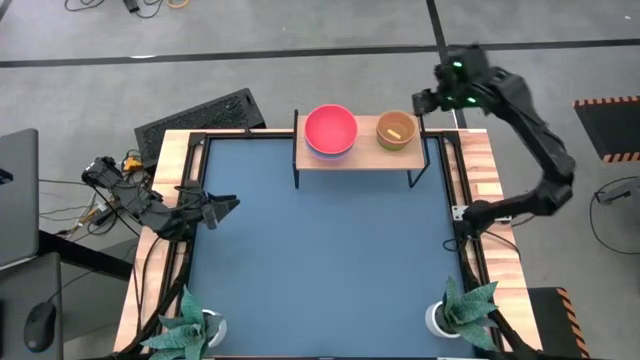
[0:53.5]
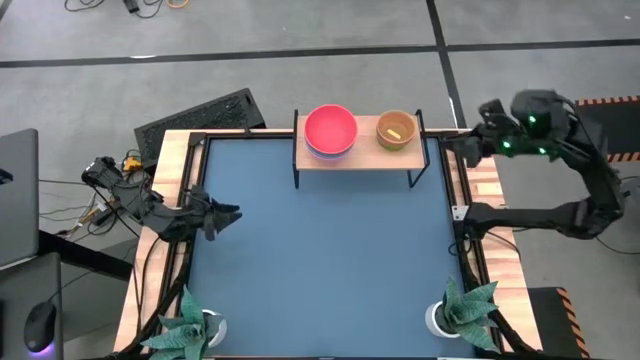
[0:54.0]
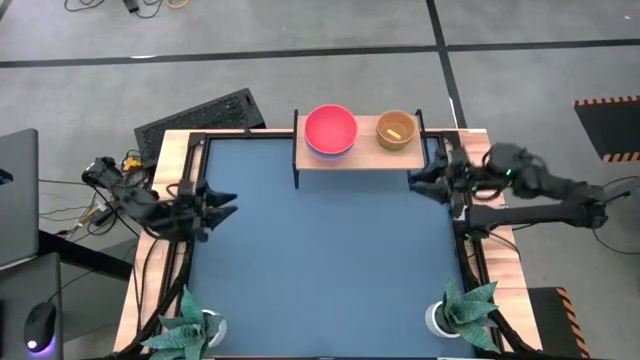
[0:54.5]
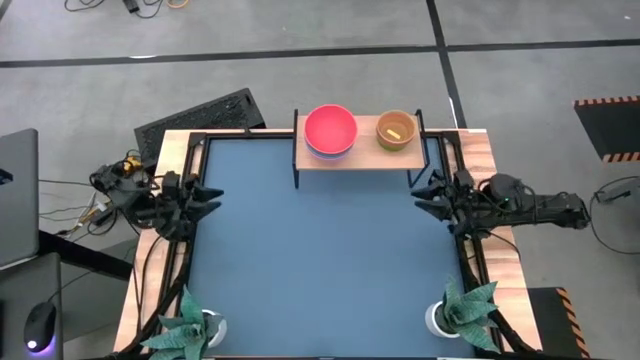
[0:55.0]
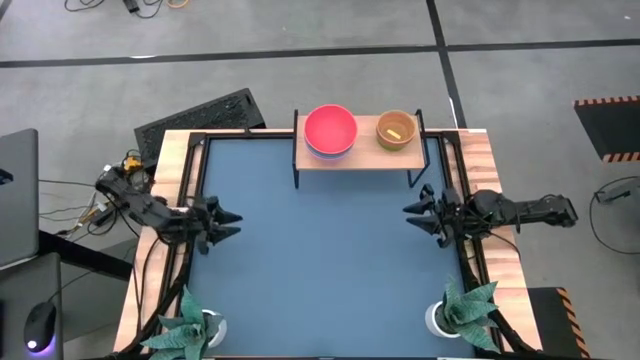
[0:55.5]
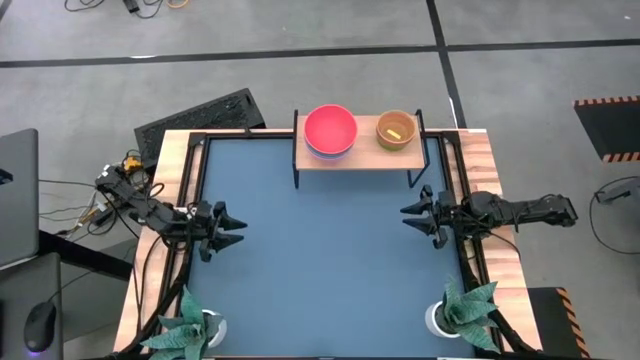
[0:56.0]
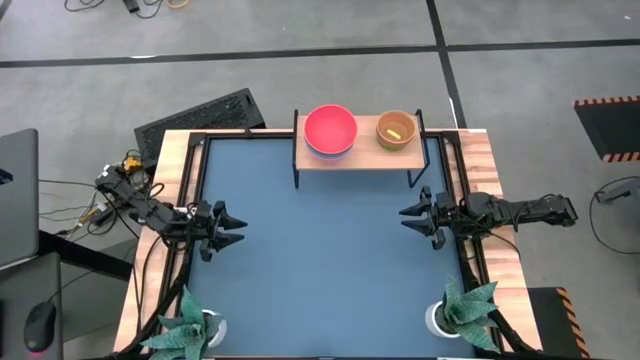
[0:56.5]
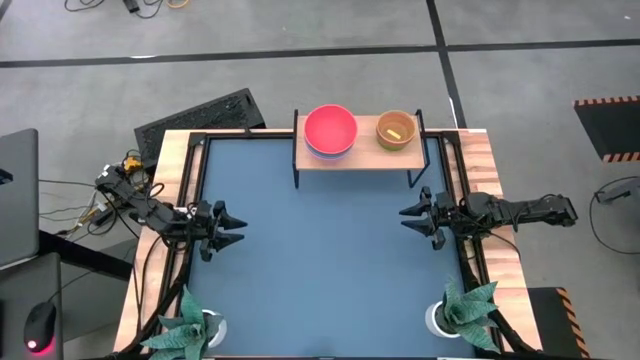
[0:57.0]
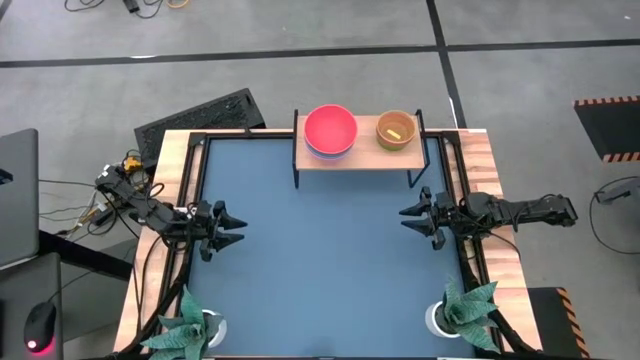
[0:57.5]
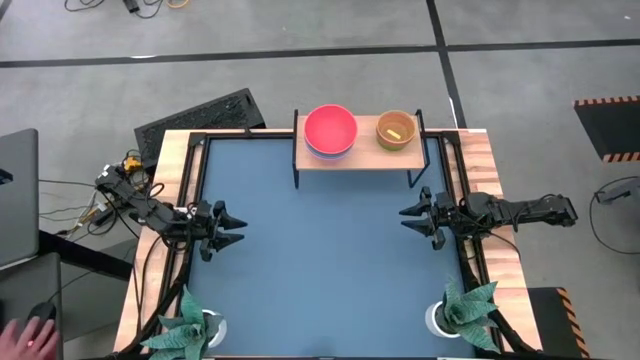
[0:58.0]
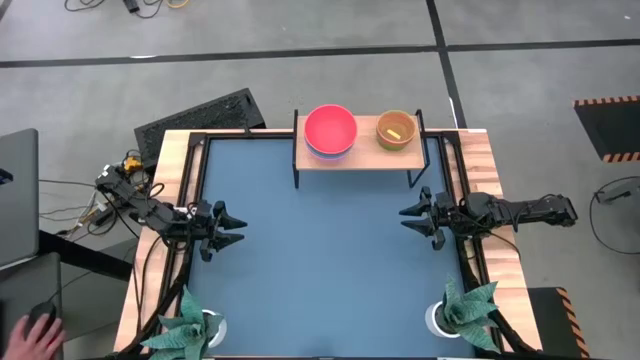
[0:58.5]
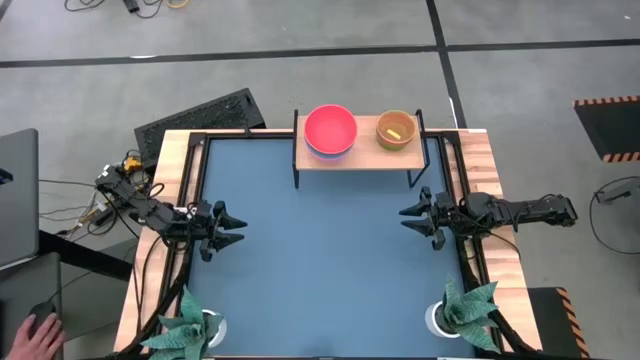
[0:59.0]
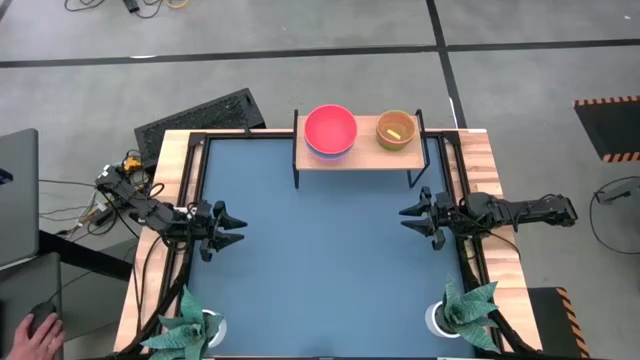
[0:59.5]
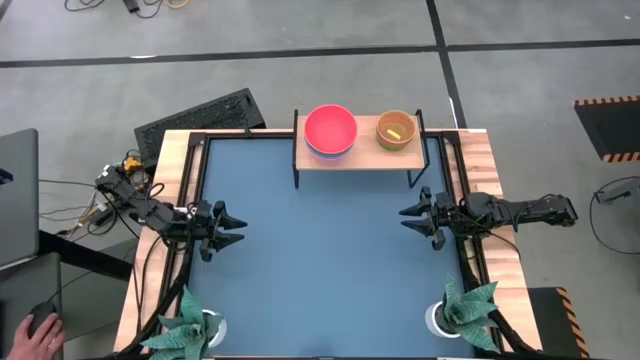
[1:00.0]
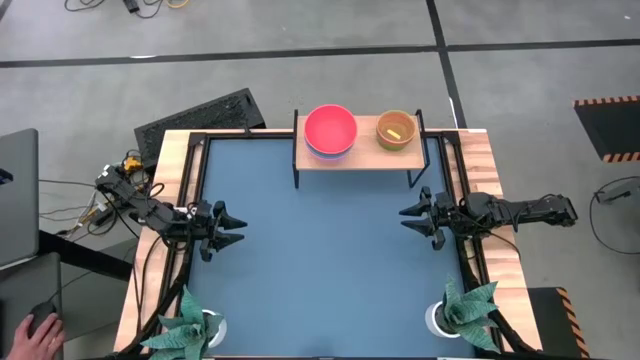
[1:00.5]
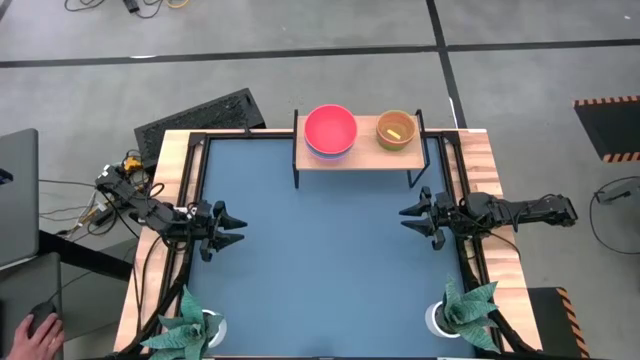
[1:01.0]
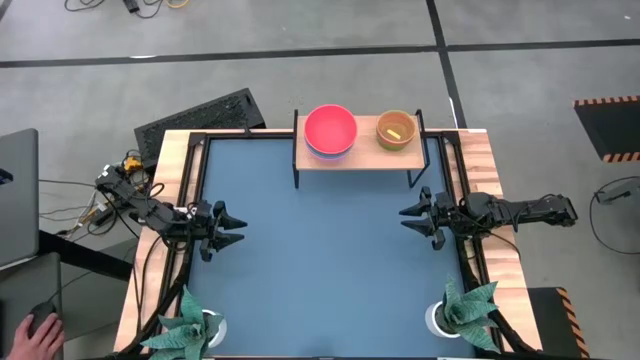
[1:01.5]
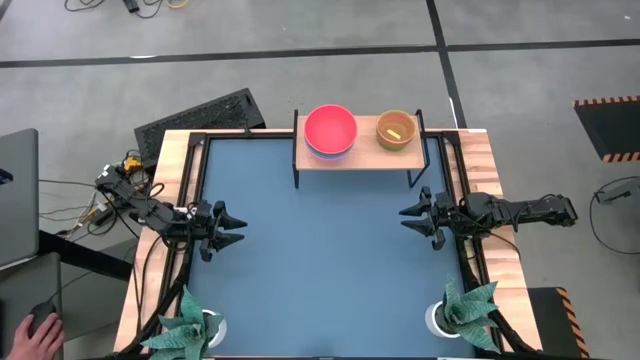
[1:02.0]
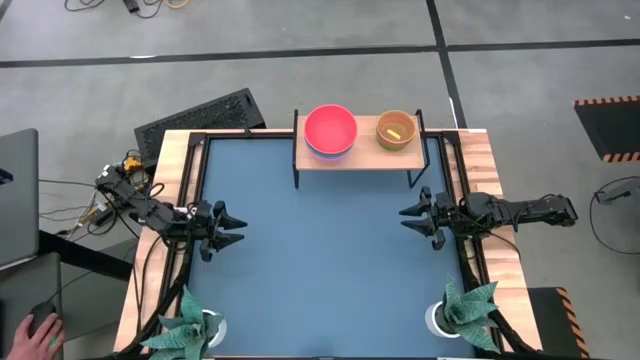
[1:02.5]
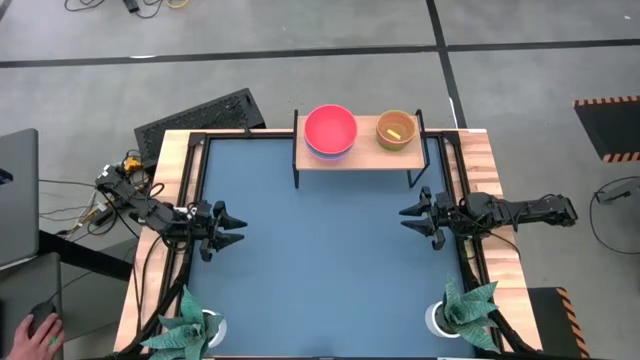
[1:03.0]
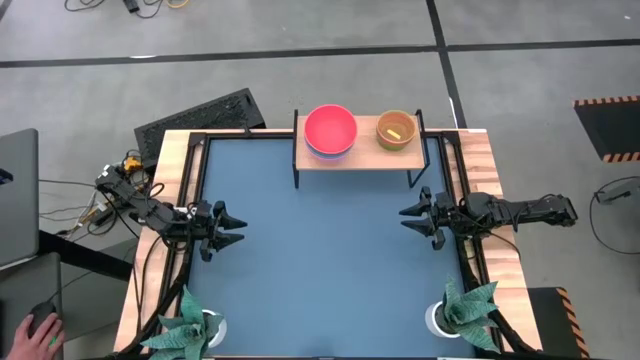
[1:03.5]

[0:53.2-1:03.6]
Task: Place and stack bowls onto a shelf
Return to Home Position

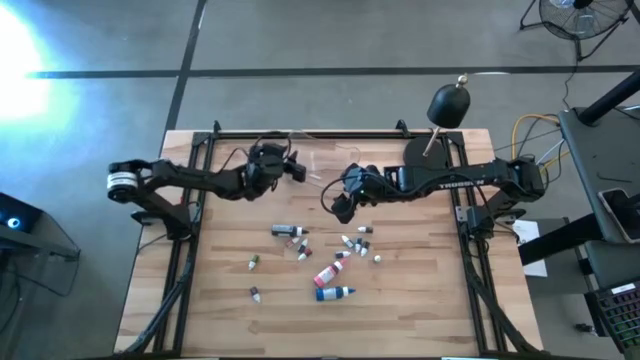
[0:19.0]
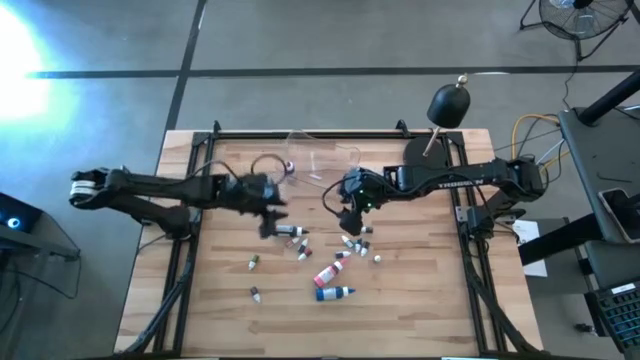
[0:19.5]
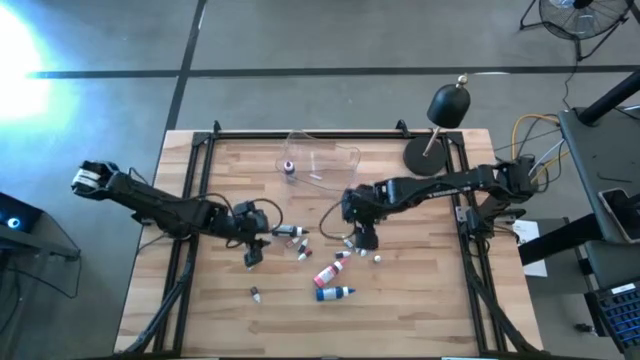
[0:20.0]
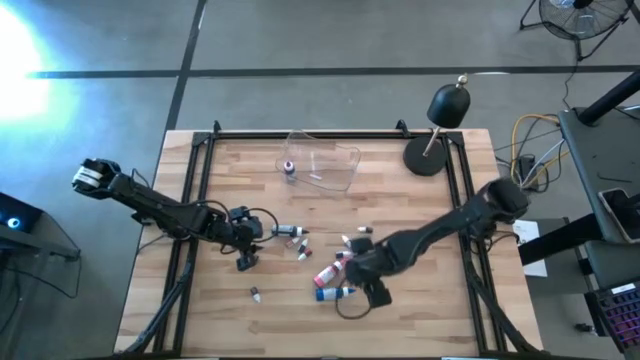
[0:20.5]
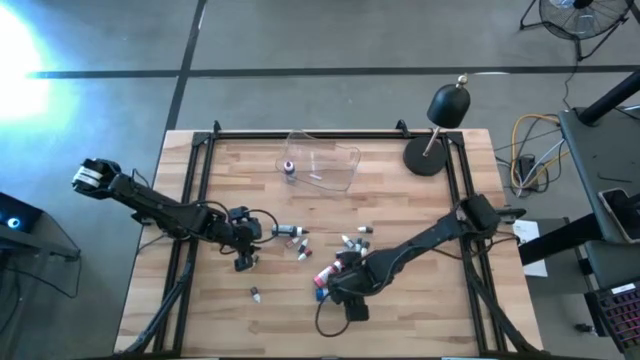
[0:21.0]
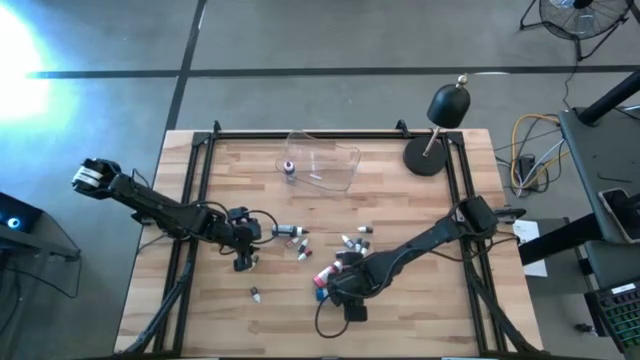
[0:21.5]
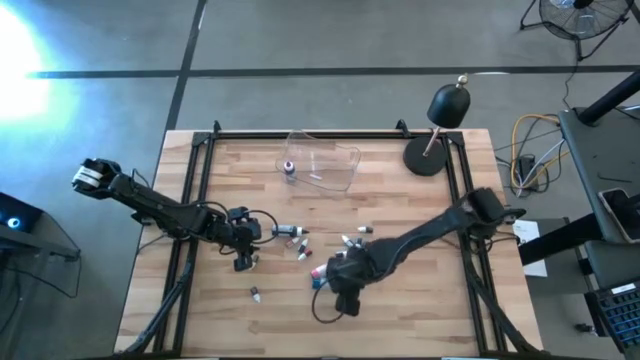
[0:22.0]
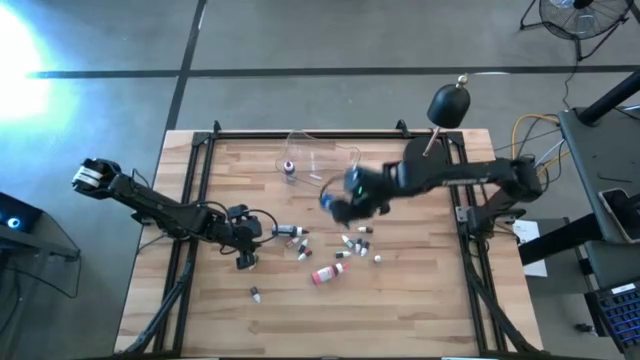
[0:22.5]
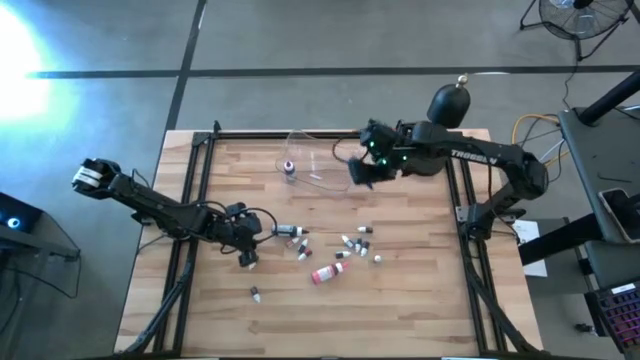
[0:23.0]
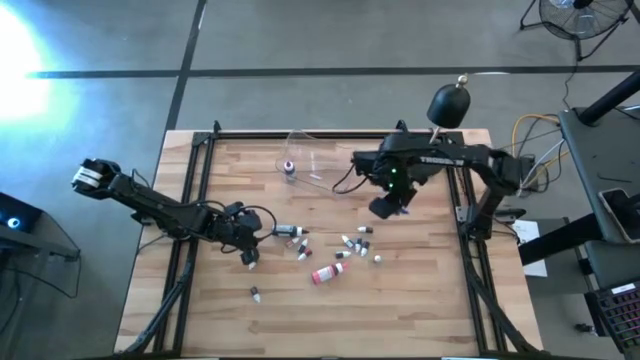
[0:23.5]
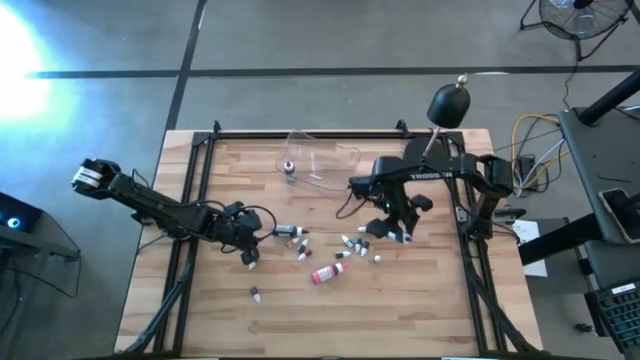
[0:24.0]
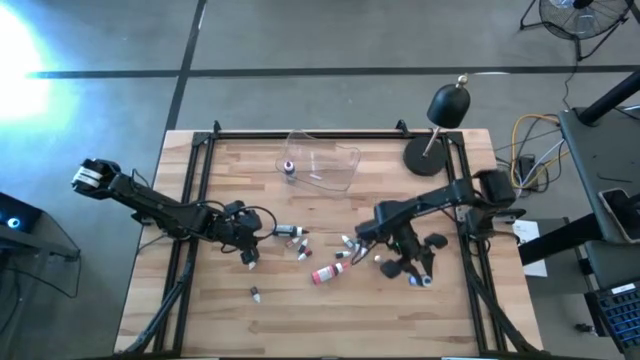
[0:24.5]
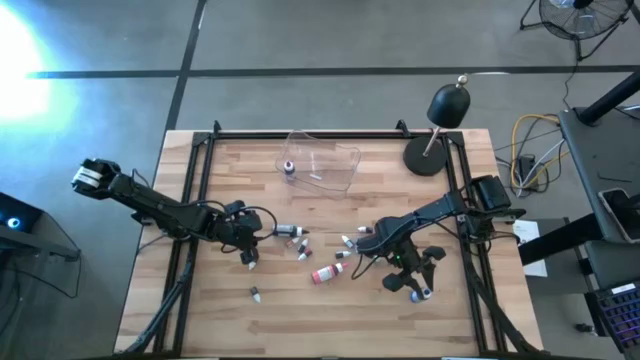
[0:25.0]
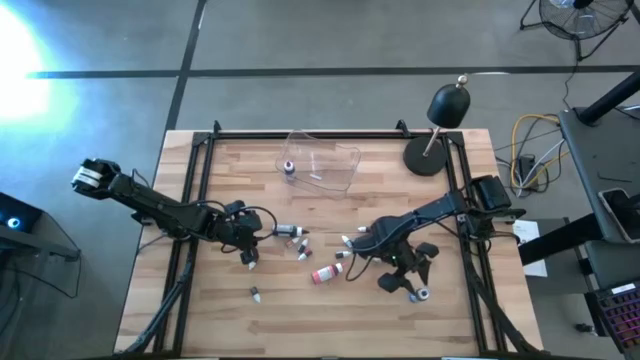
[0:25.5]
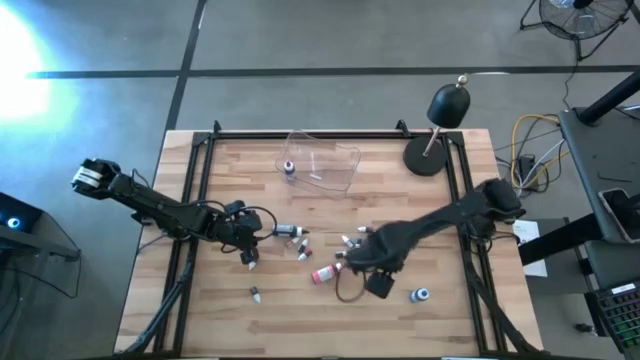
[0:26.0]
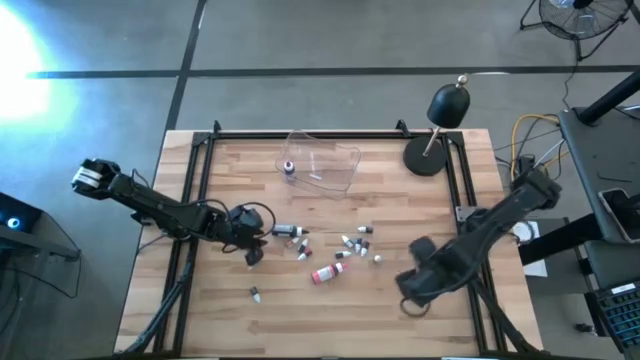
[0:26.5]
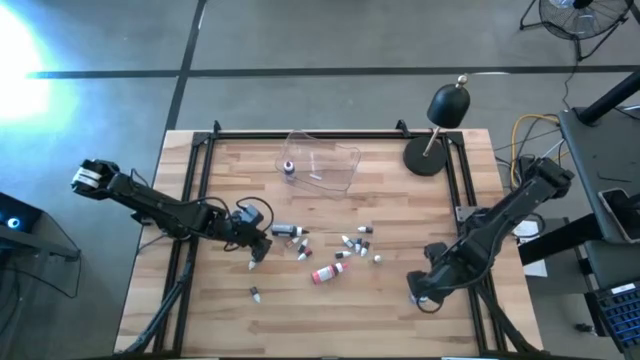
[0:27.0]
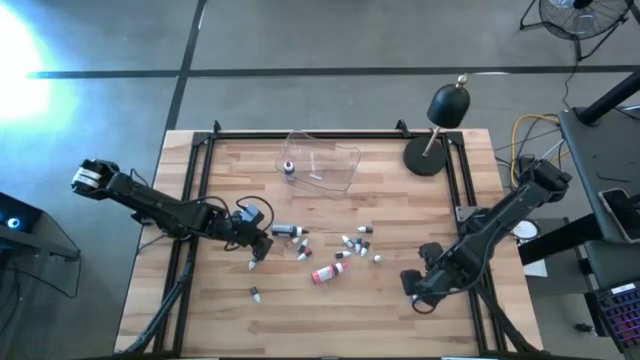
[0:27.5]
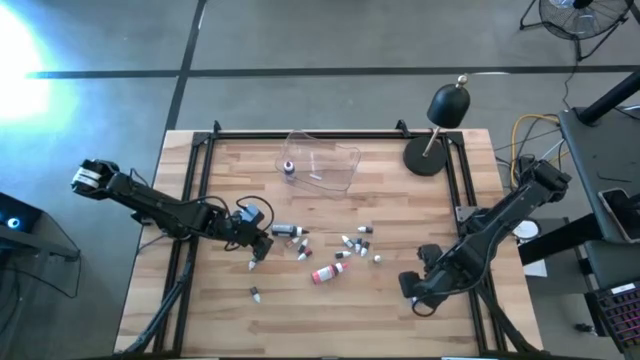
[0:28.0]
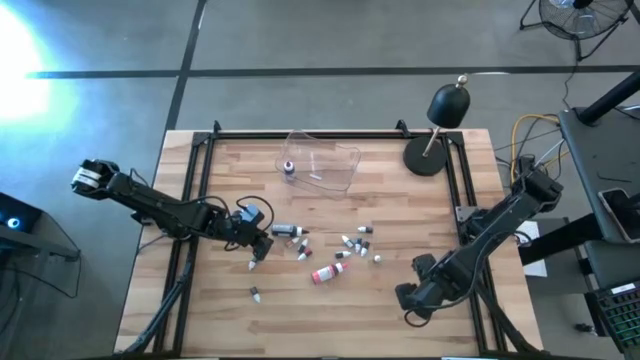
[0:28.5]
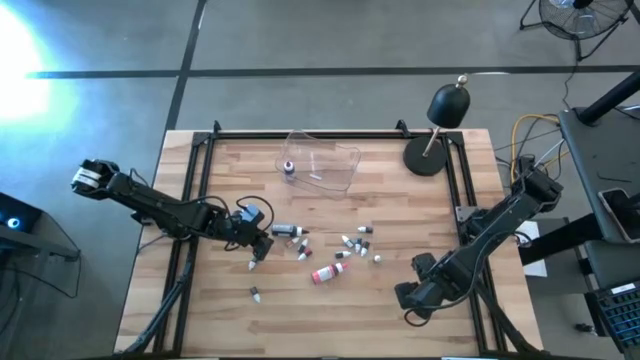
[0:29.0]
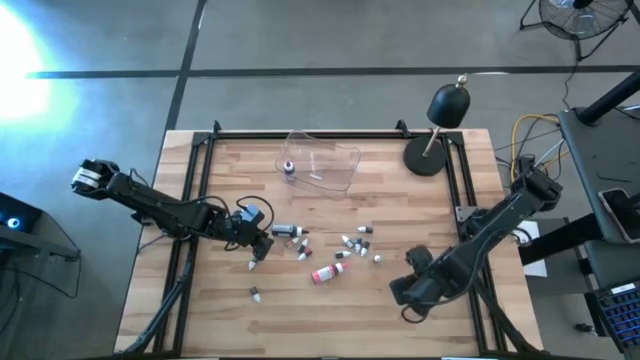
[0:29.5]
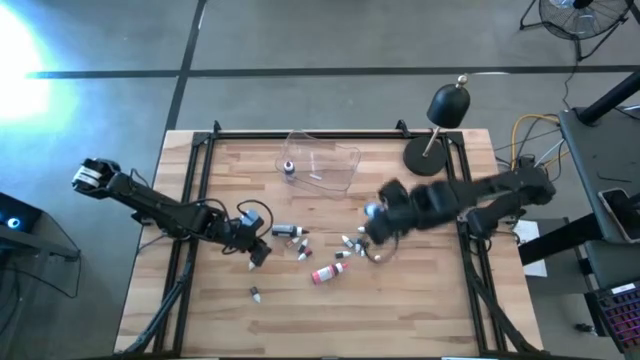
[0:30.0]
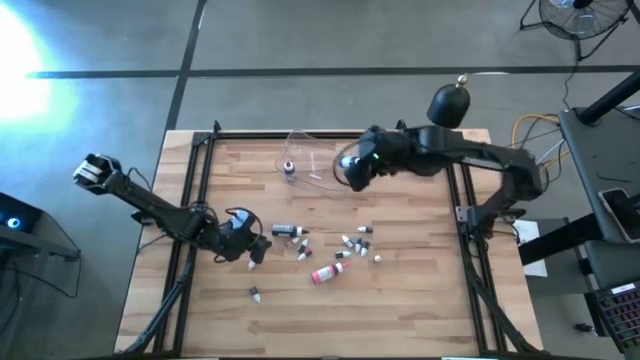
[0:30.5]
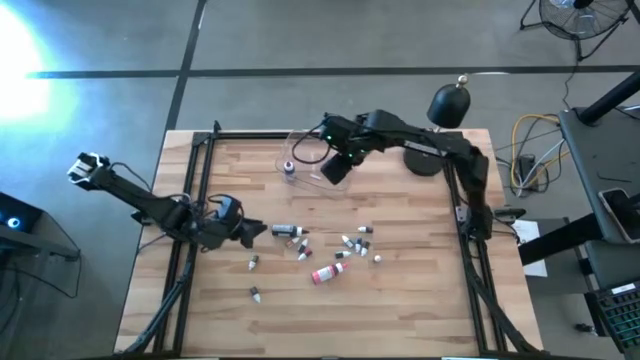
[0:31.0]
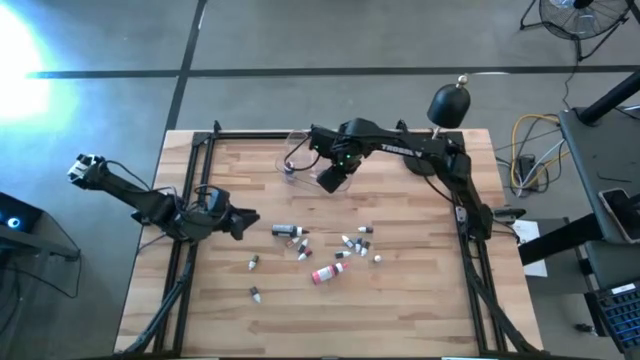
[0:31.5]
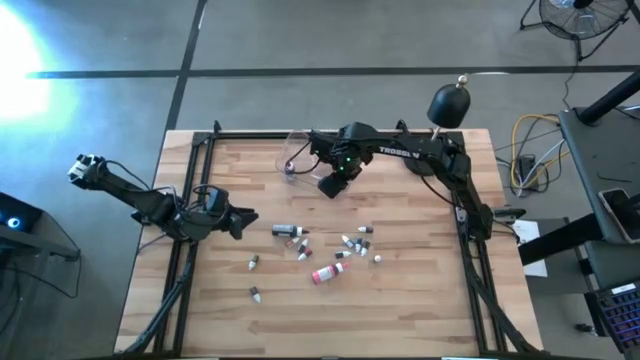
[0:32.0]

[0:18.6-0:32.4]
Task: Pick & Place food coloring
Put the large blue food coloring bottle into the transparent bin
